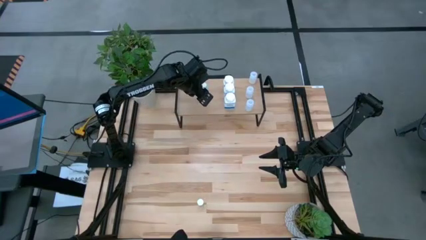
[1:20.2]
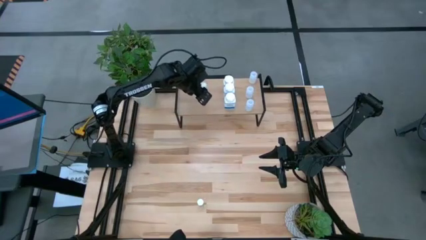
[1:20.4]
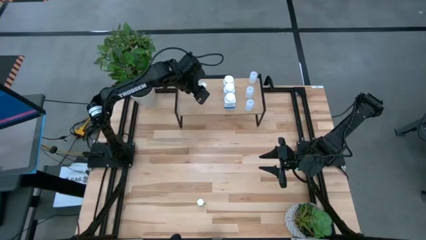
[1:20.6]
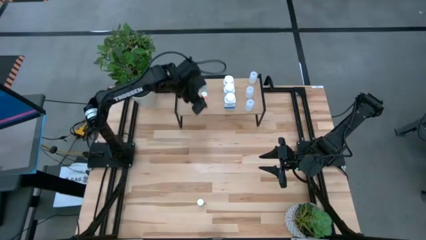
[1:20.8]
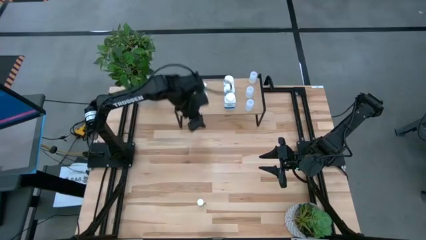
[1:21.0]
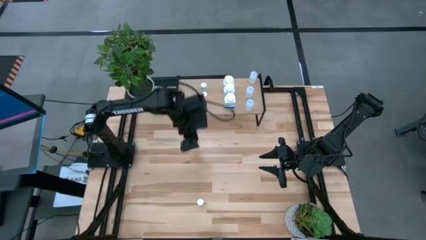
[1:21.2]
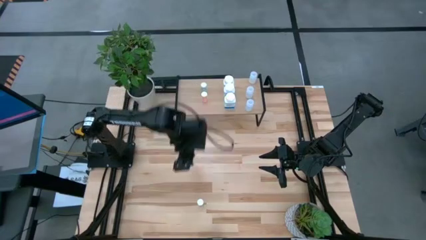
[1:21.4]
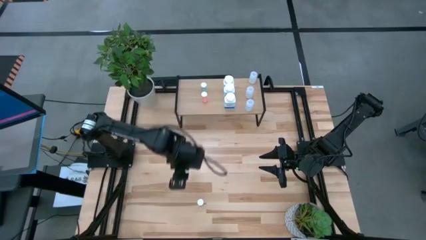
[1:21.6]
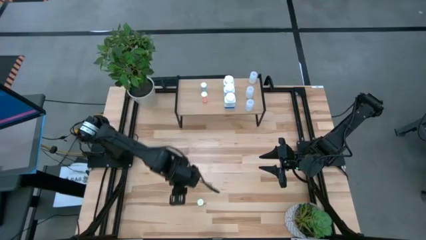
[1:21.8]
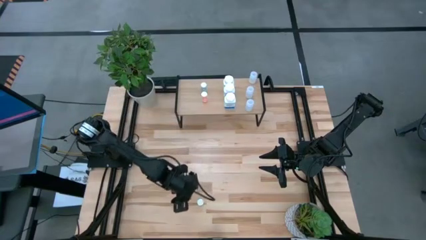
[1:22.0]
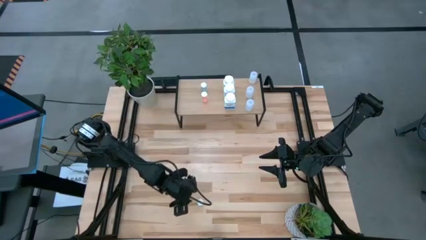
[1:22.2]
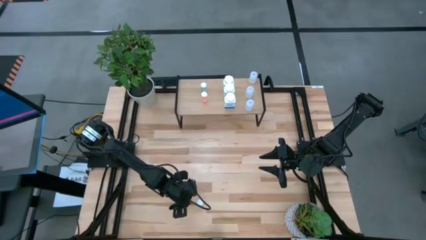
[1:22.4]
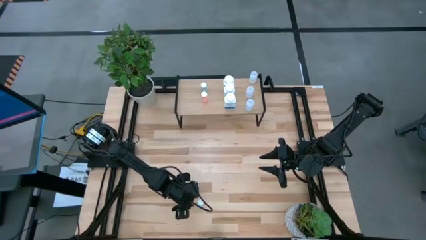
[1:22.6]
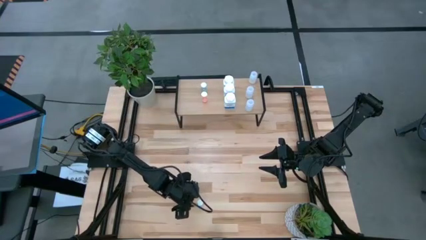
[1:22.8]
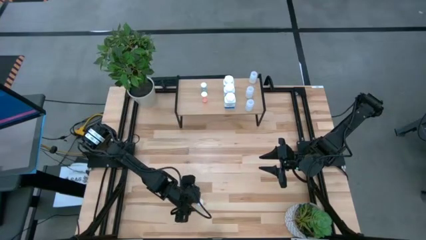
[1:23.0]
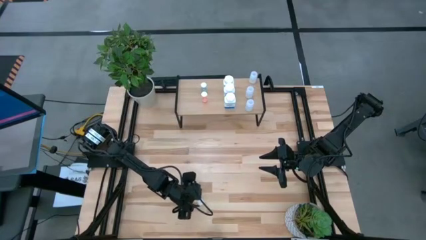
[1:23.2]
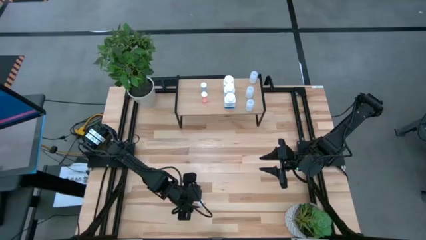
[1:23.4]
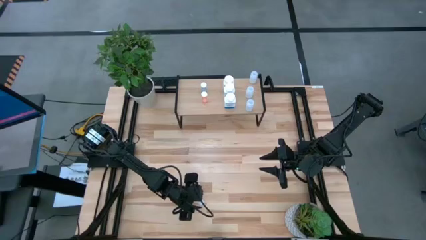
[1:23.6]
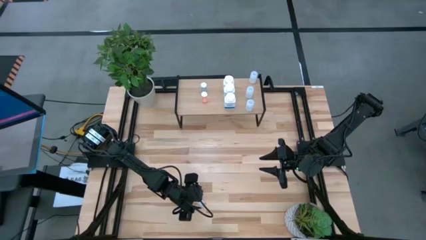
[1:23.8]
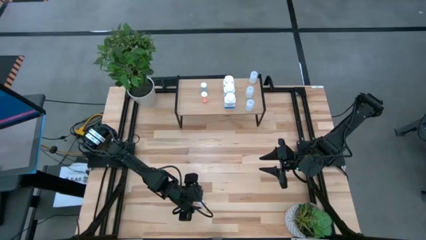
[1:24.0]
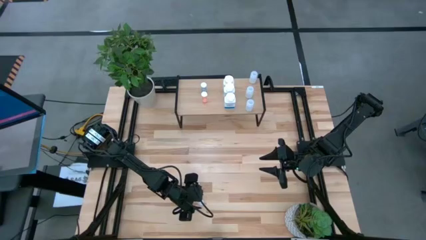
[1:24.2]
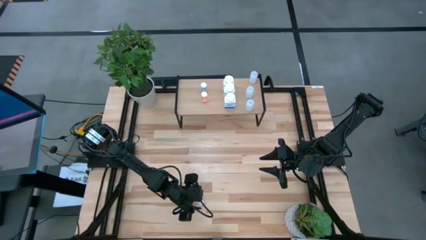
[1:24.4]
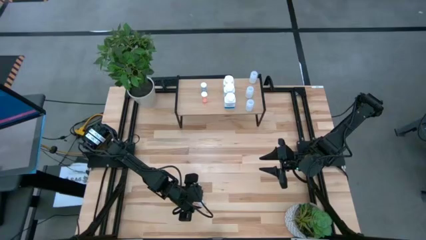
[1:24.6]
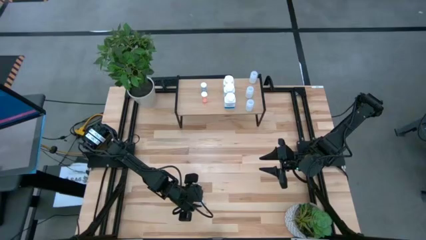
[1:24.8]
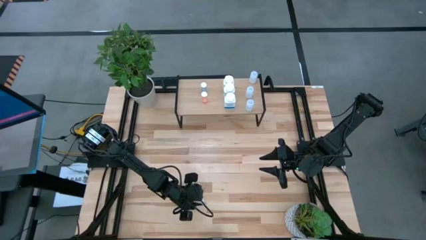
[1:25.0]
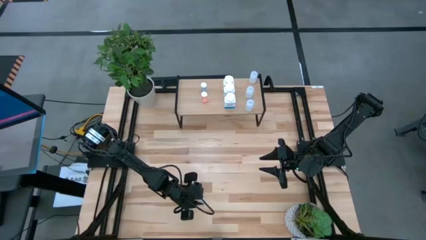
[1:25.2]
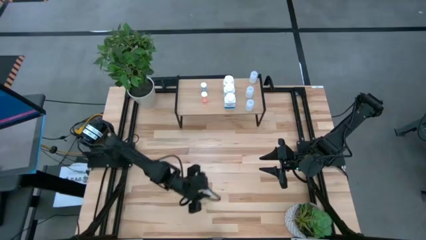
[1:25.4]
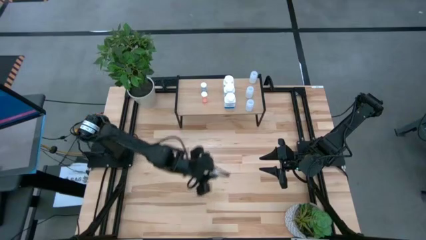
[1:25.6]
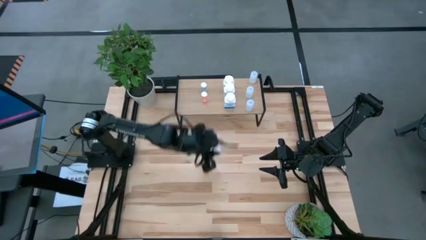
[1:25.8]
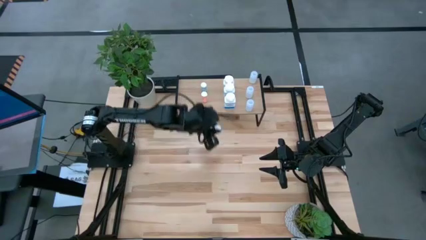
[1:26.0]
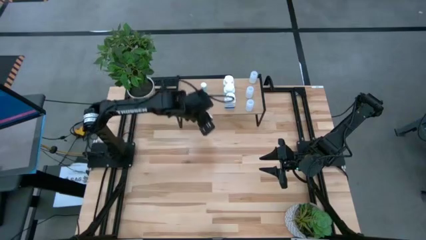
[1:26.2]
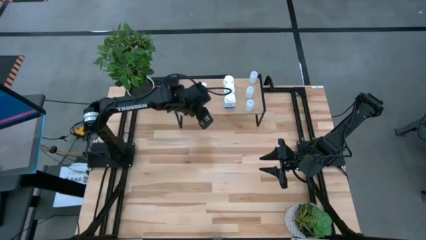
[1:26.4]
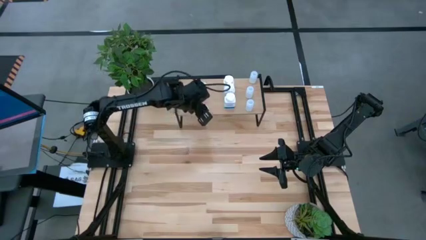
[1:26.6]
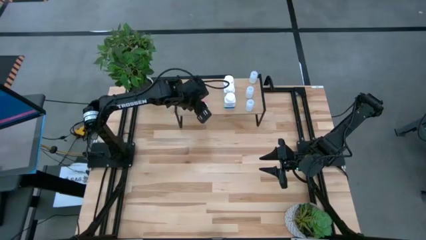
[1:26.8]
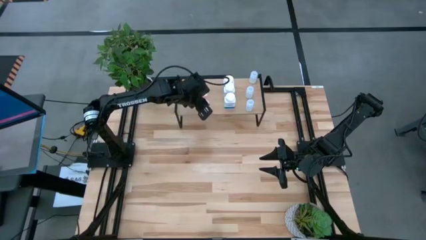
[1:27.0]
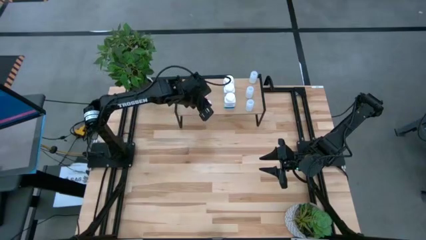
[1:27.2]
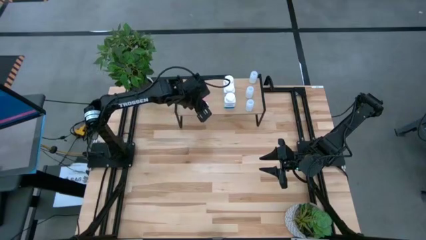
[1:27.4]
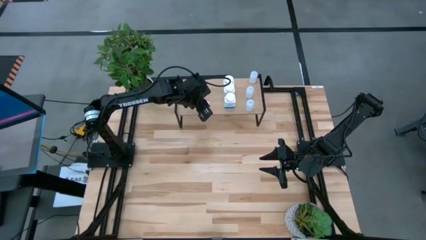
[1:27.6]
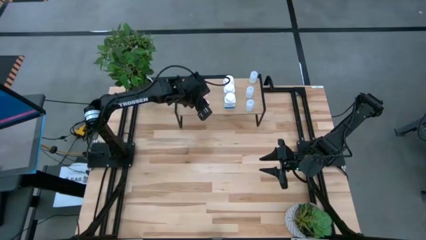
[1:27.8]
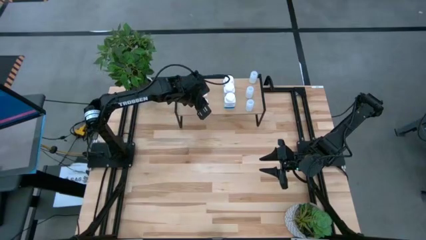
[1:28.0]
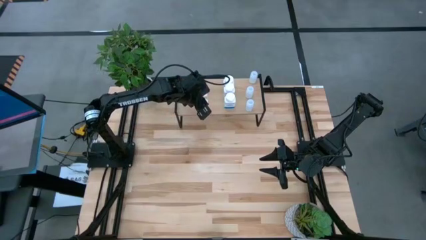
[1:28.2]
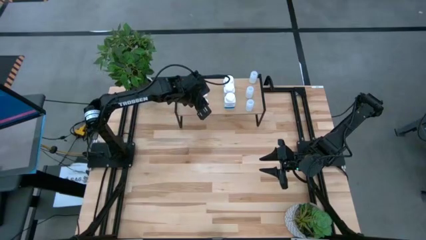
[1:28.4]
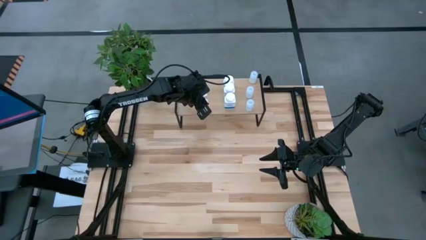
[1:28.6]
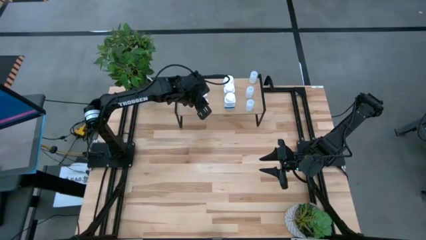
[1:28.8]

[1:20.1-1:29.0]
Task: Pick and place medicine bottles onto shelf by color
Align the yellow bottle with the other orange bottle on the shelf

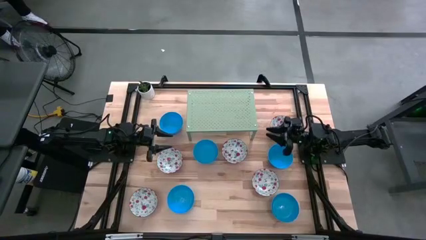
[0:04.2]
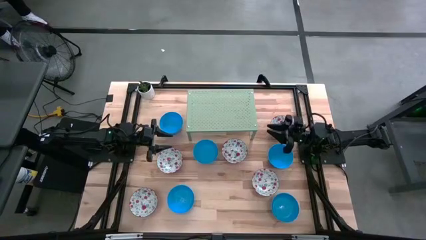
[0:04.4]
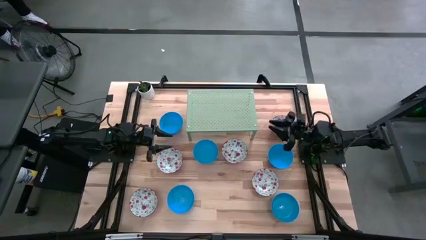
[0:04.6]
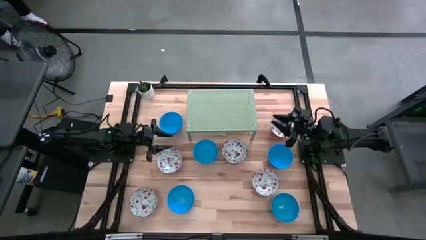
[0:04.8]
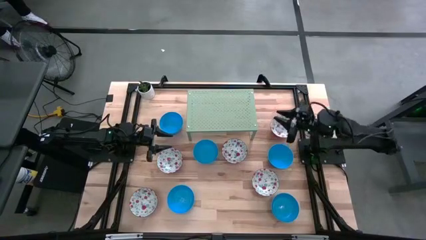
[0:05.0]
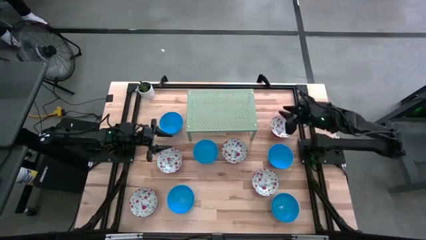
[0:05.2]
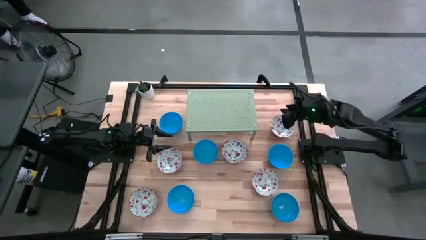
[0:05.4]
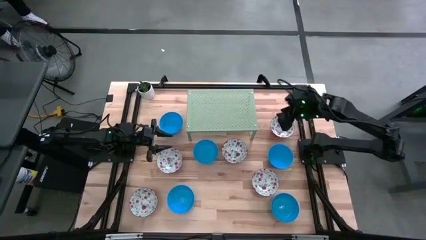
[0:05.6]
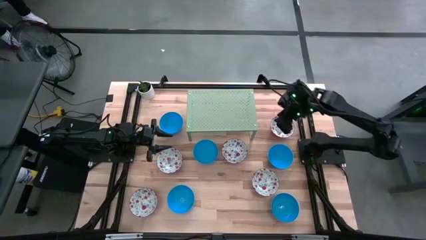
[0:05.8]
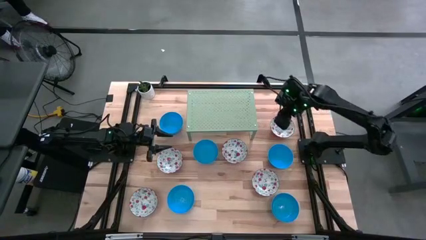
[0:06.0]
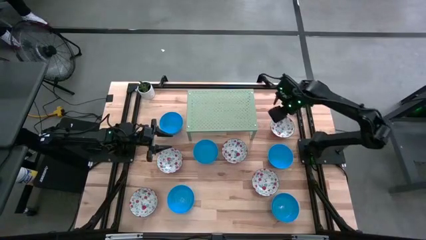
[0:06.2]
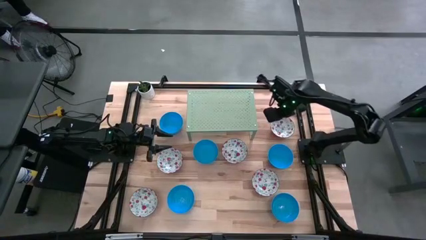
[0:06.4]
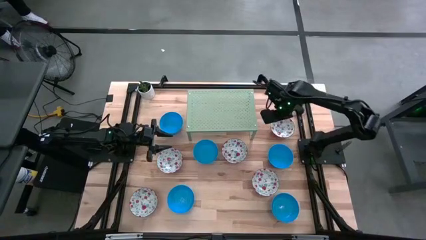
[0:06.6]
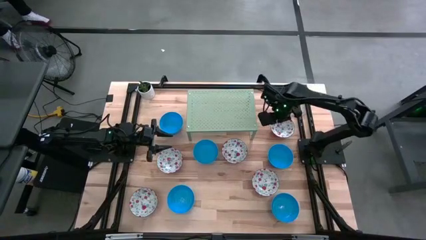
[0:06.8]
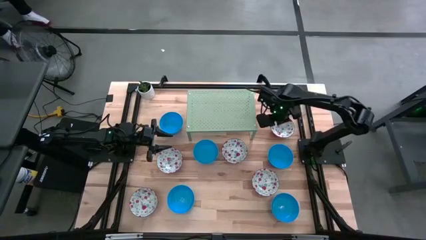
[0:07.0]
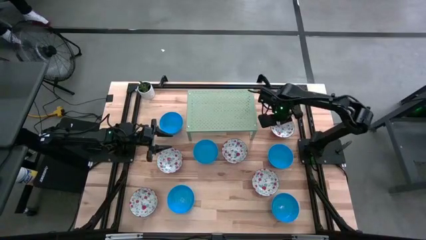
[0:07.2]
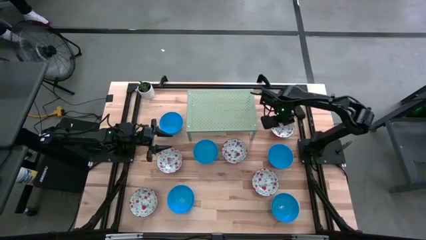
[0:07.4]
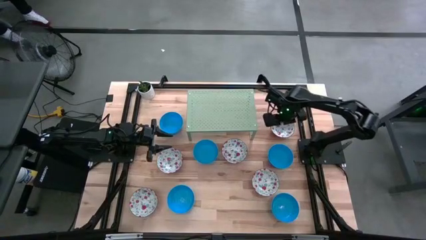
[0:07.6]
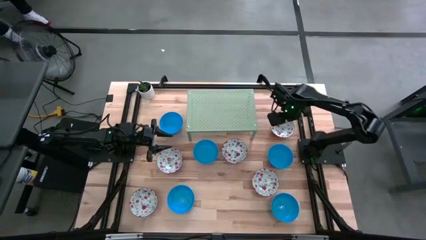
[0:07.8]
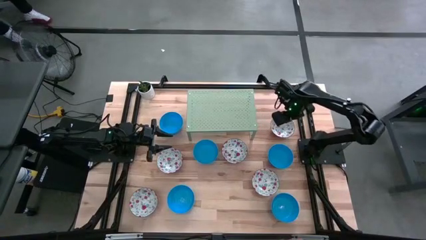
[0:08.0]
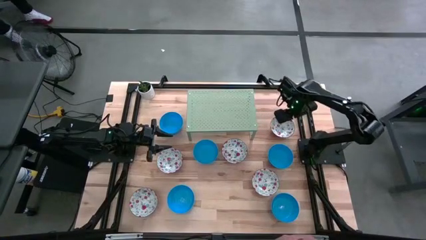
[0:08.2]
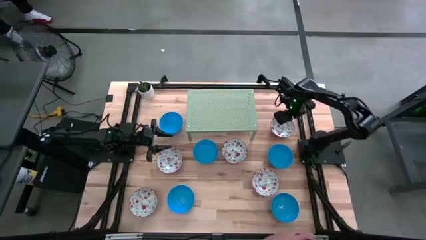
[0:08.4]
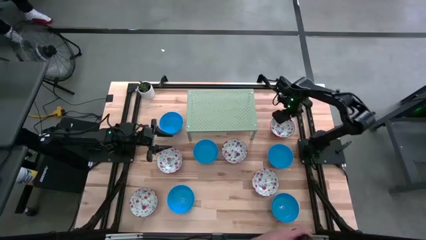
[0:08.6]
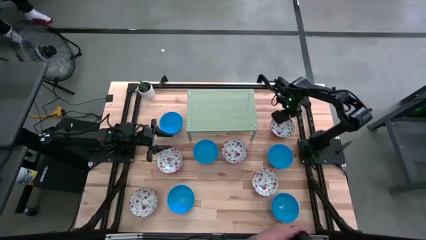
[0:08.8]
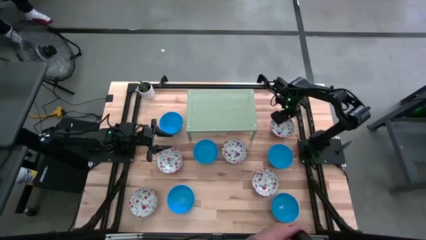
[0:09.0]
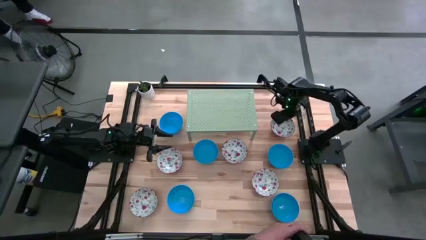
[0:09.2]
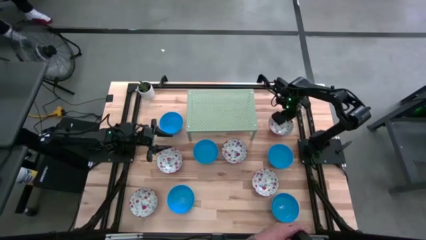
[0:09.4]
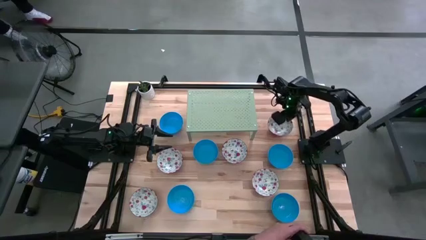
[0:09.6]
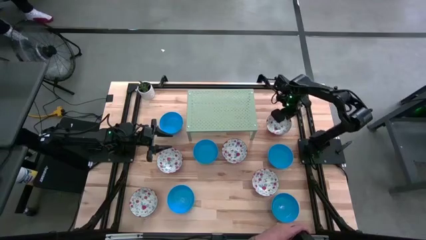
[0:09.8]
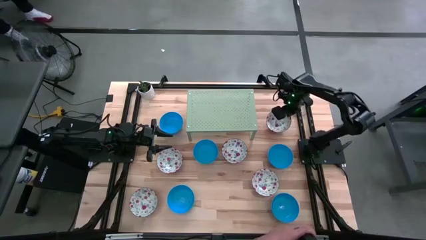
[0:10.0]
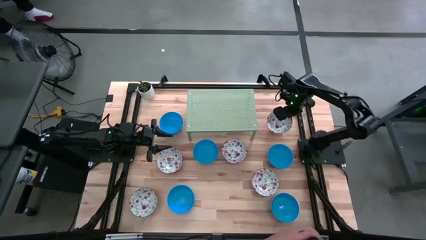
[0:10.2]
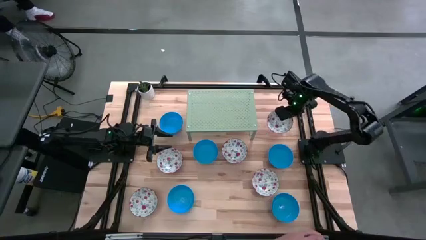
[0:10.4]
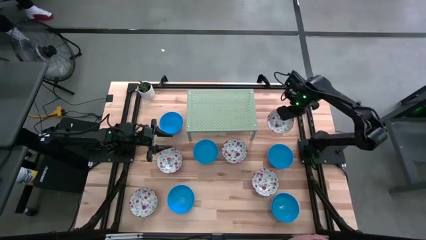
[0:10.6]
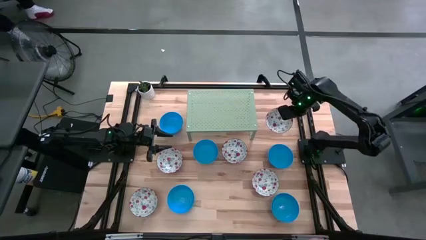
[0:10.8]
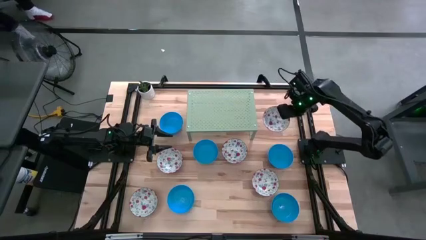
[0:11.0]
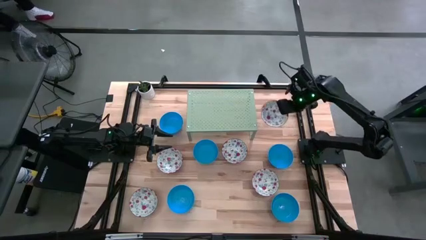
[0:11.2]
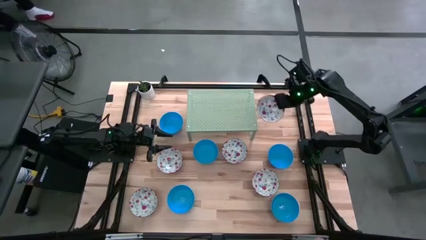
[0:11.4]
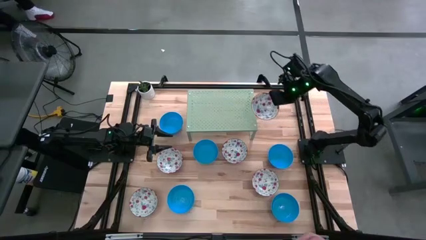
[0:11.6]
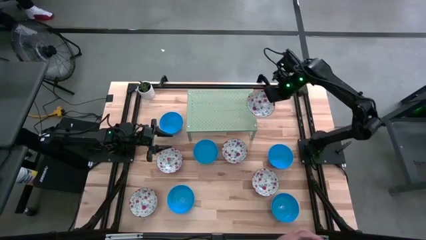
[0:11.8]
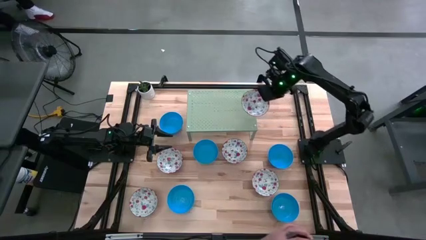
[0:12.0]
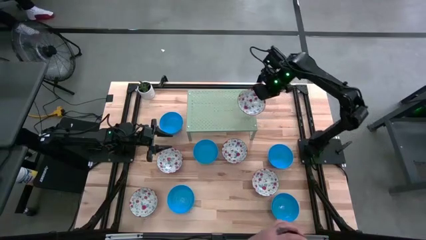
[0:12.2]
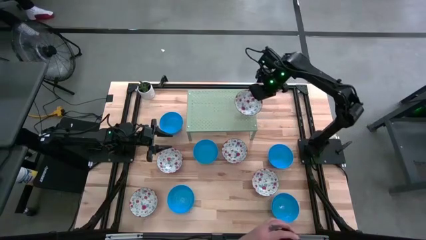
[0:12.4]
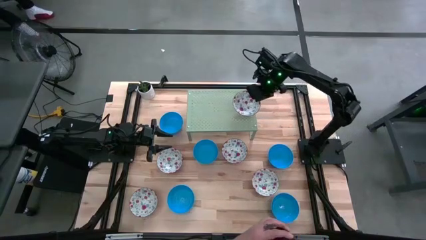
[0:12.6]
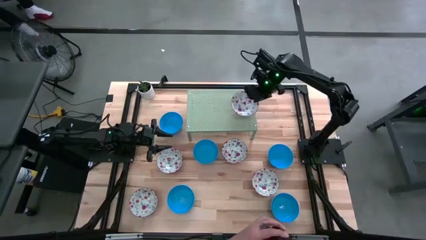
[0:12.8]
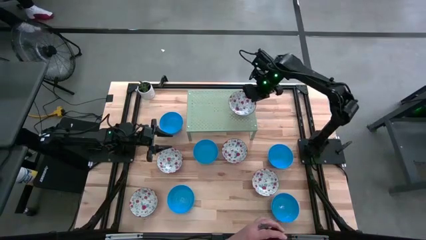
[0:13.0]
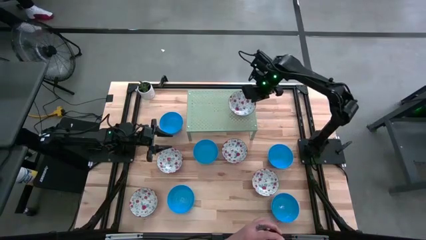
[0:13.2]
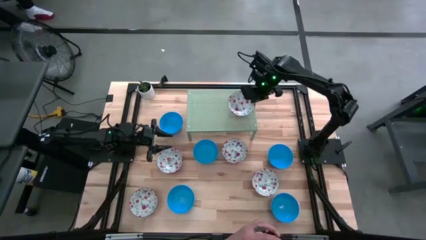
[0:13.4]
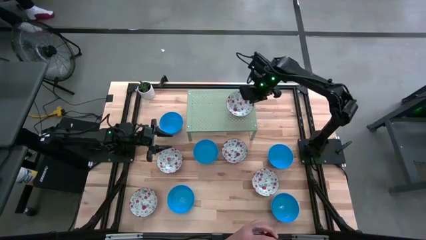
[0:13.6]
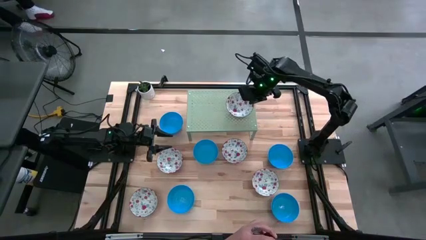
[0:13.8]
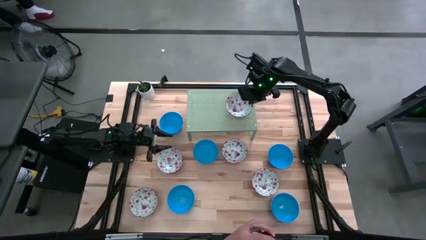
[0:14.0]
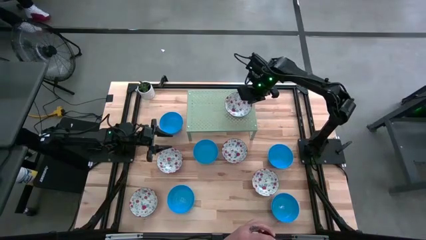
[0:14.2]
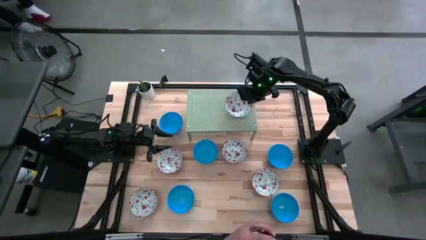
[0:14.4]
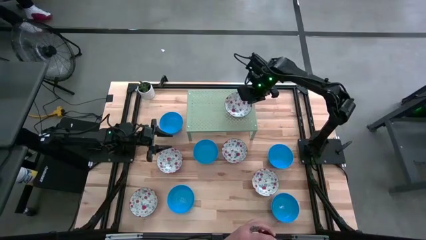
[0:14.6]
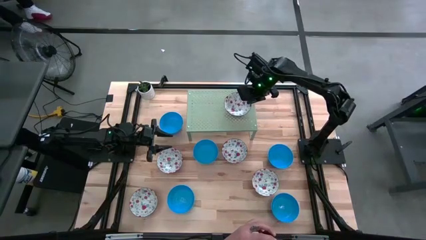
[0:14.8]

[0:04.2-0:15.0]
Task: Pick & Place Mini bowls
Put the red bowl on the shelf
